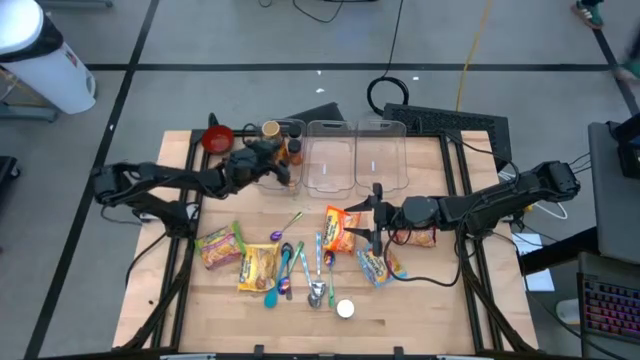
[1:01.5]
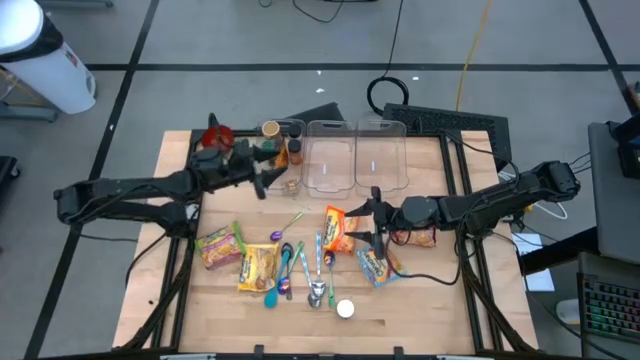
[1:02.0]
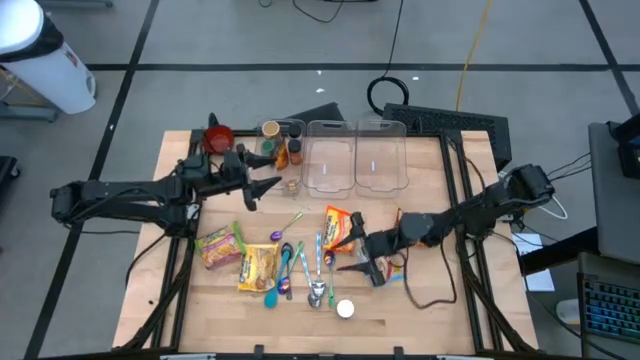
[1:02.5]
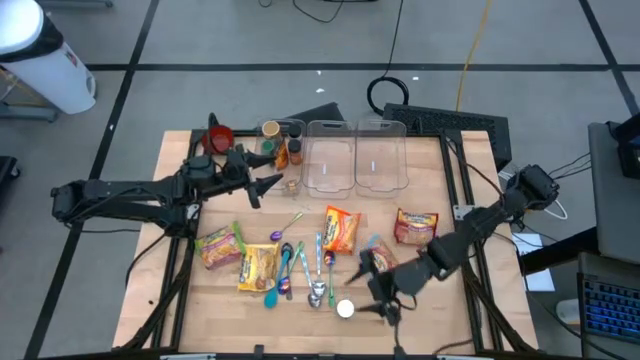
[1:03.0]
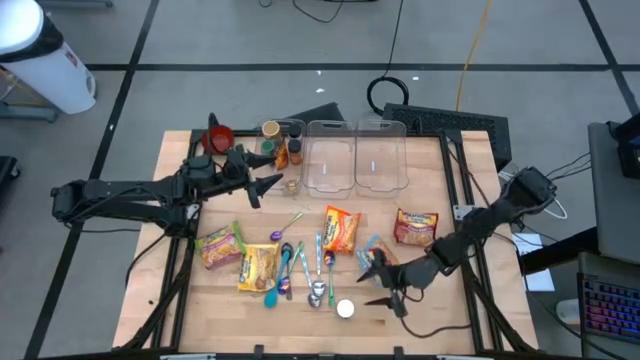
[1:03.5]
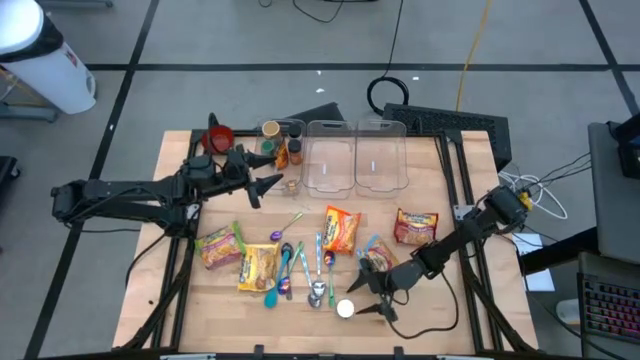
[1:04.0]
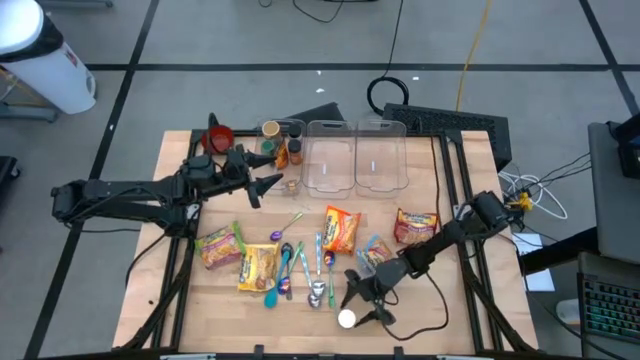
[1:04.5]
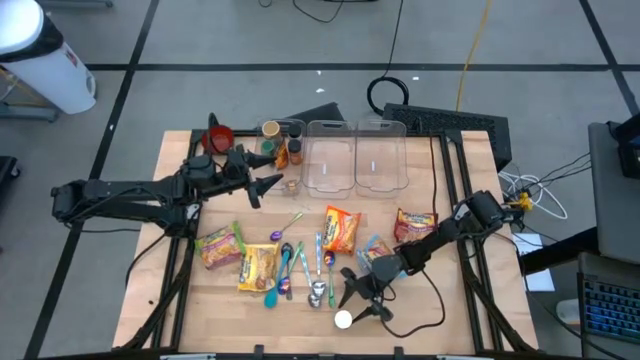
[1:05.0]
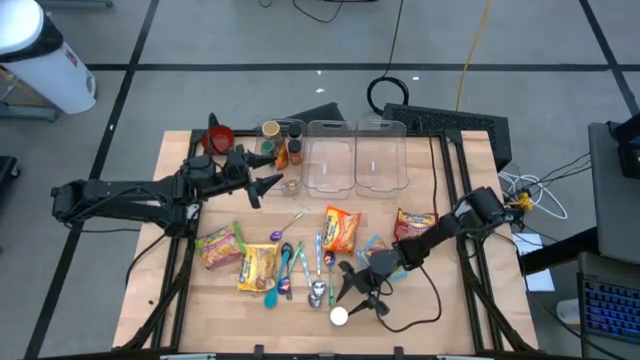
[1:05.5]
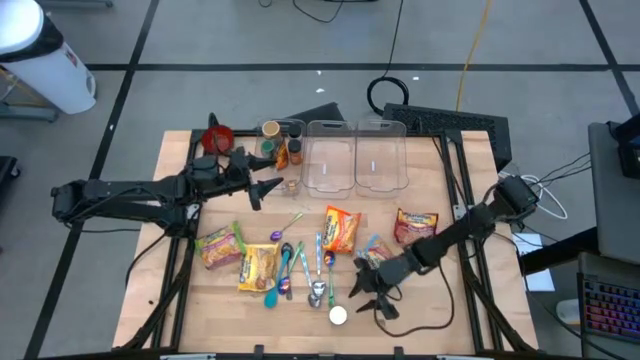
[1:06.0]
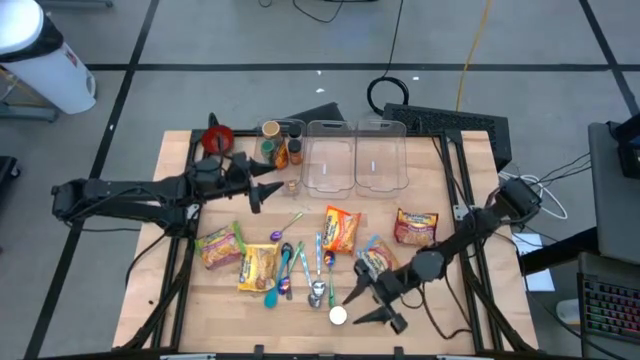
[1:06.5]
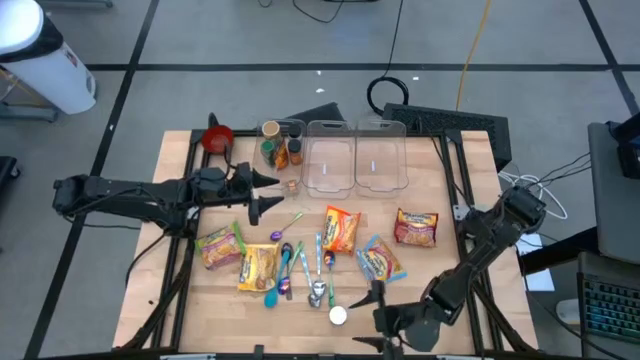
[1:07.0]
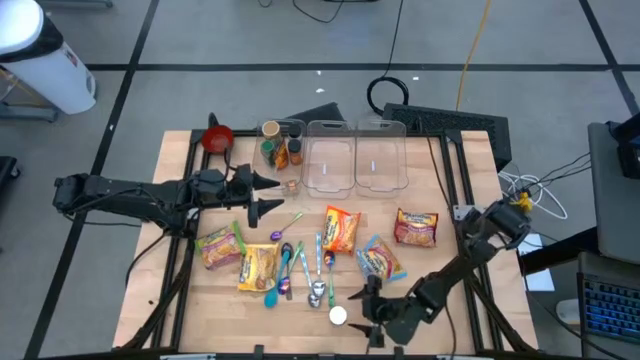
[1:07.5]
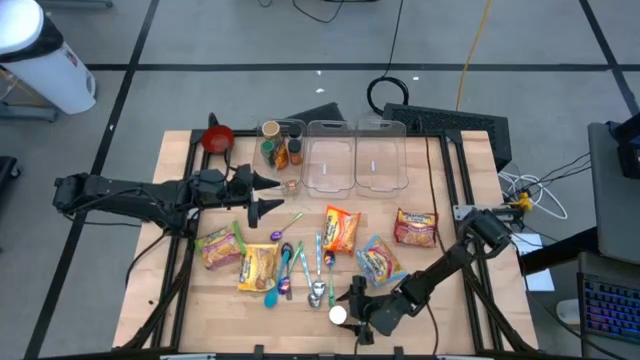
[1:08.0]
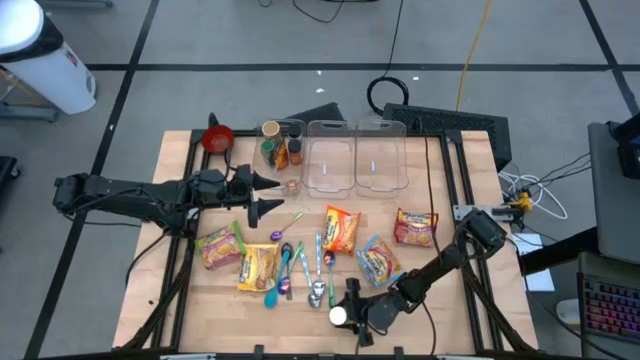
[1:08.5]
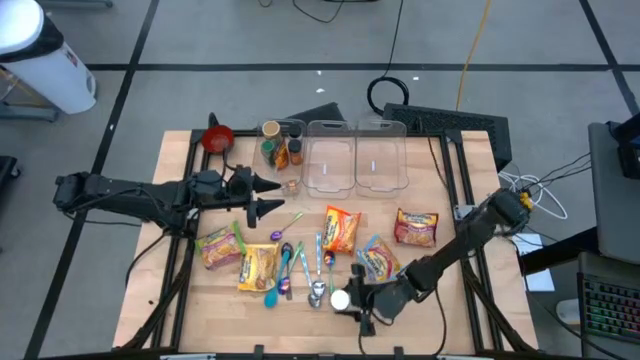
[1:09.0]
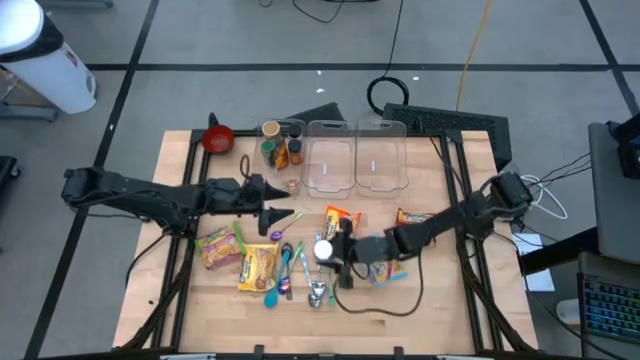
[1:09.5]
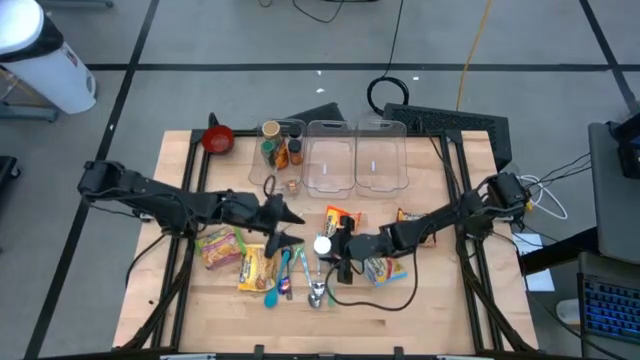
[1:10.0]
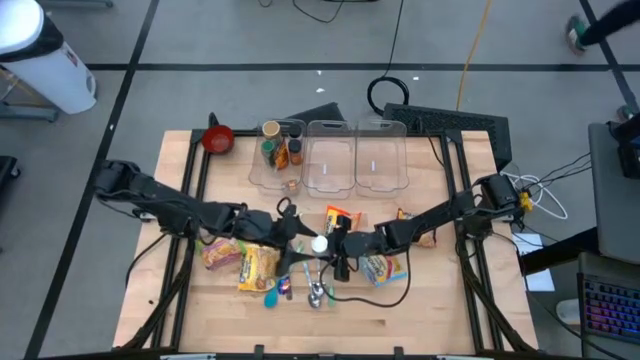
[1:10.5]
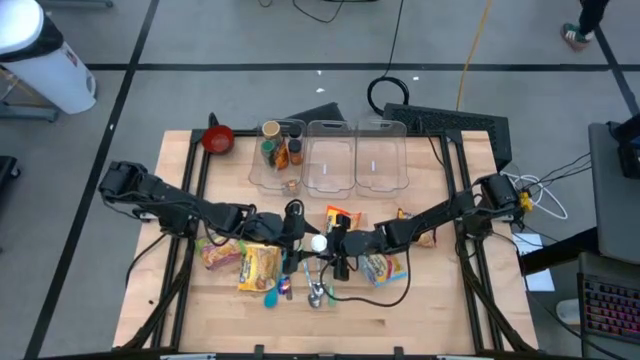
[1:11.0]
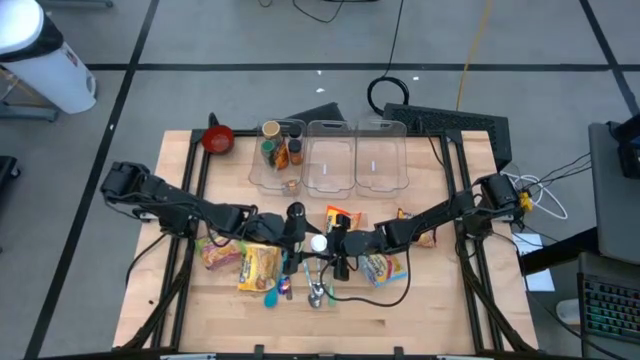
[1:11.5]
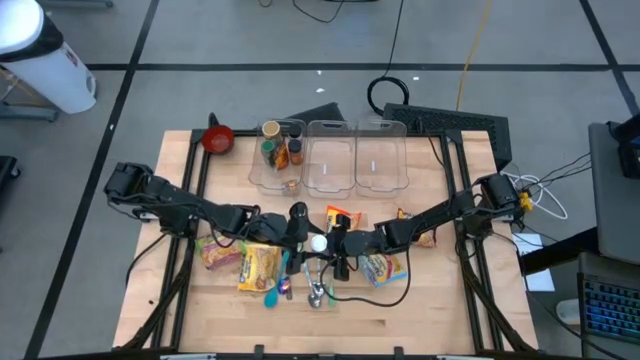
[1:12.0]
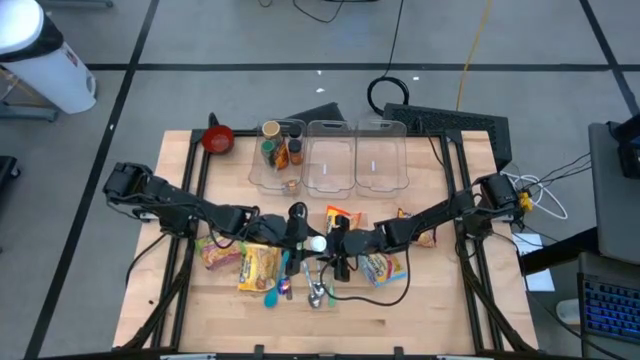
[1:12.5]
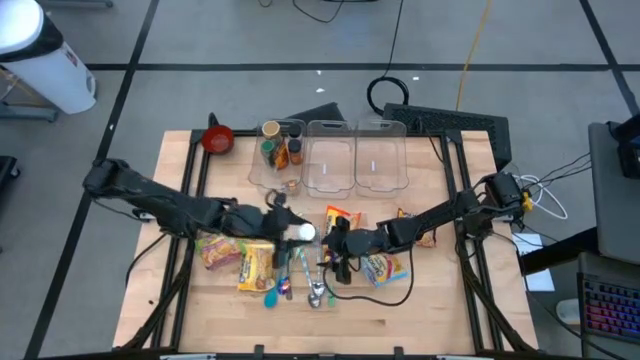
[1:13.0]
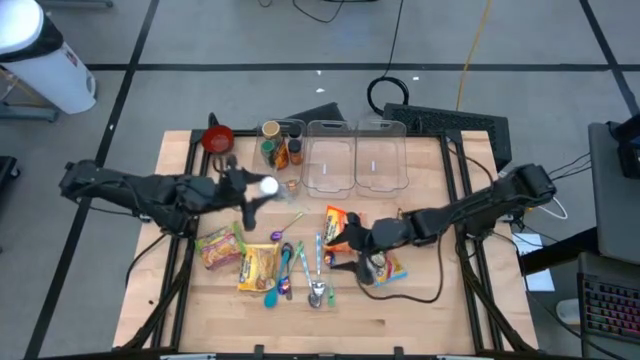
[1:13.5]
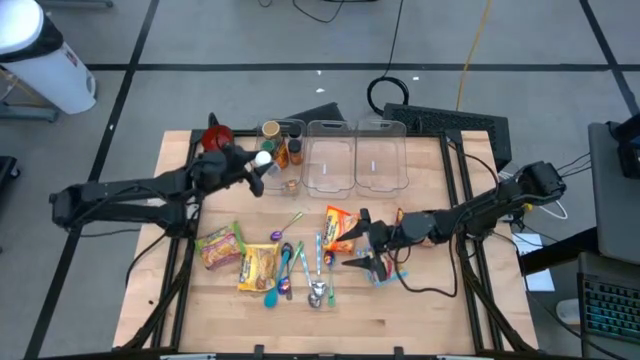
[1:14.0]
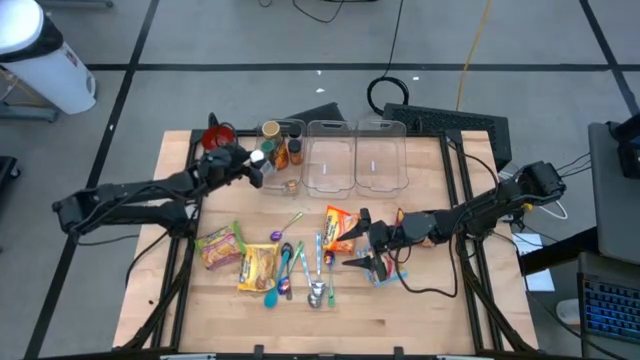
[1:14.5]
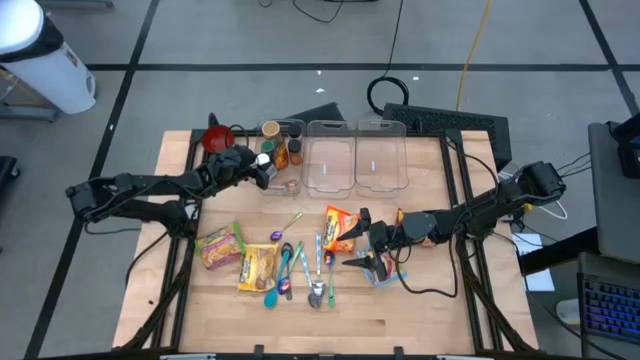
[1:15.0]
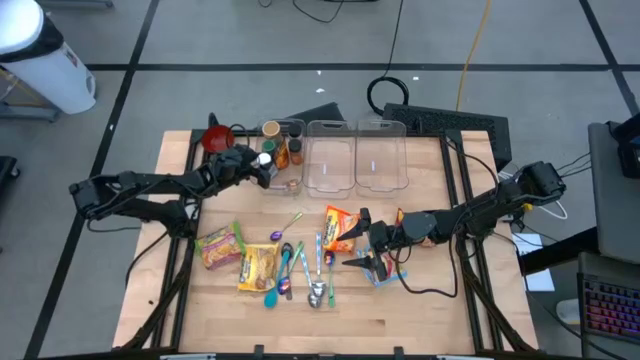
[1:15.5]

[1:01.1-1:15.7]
Task: Pick & Place Food Item
Put the white seasoning bottle into the left transparent bin

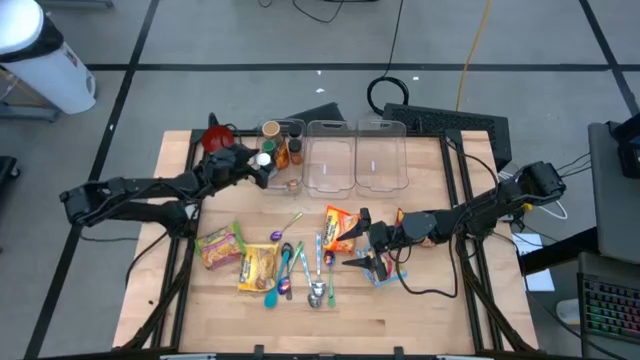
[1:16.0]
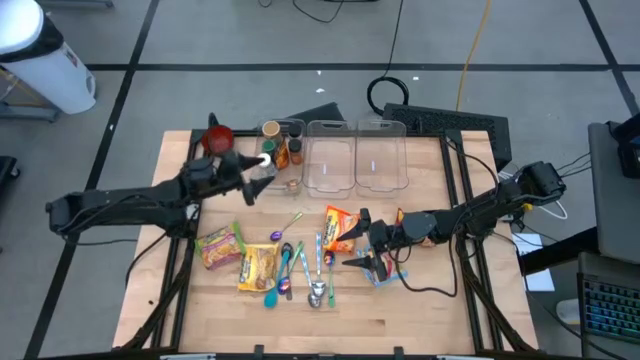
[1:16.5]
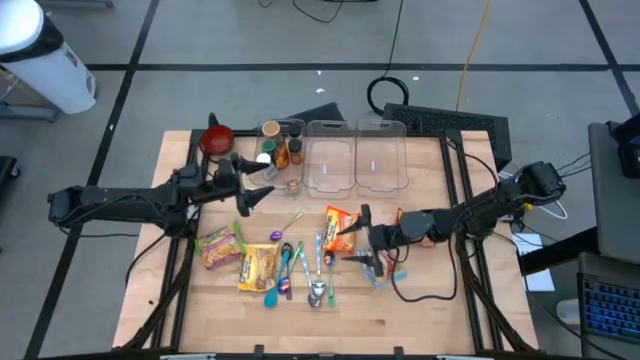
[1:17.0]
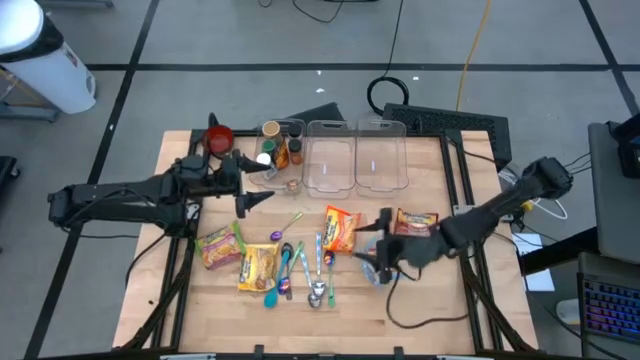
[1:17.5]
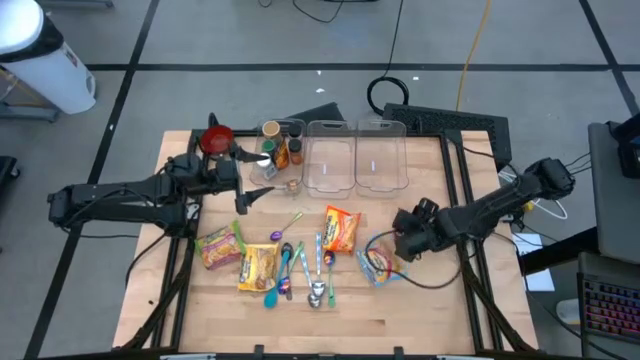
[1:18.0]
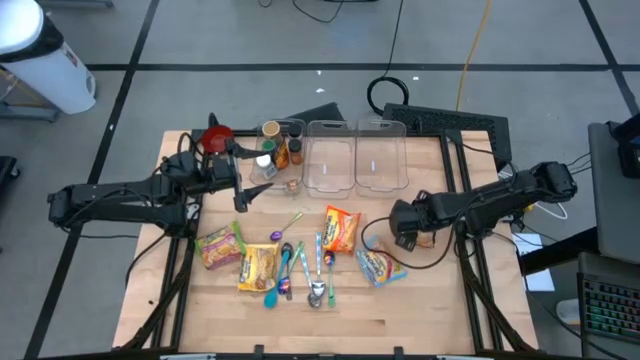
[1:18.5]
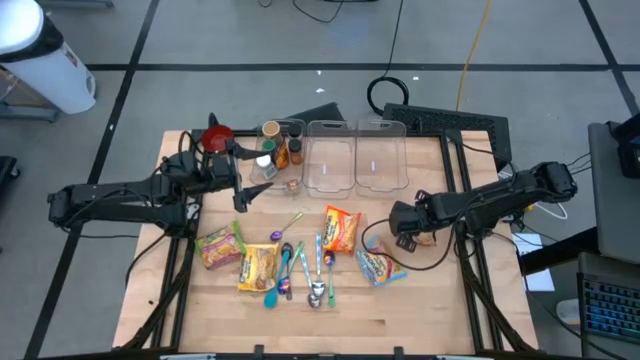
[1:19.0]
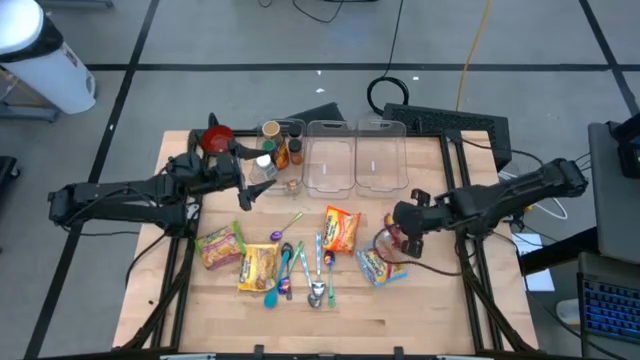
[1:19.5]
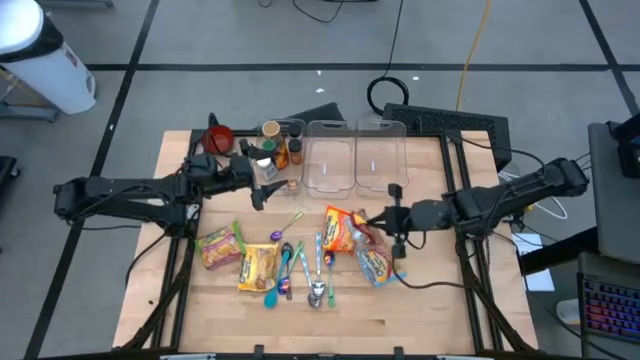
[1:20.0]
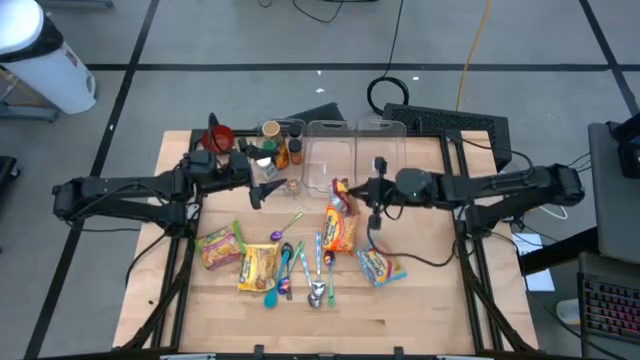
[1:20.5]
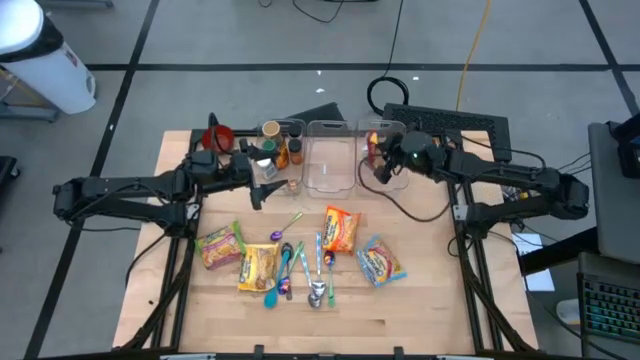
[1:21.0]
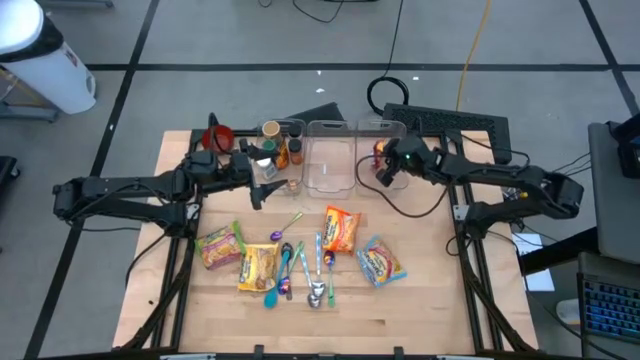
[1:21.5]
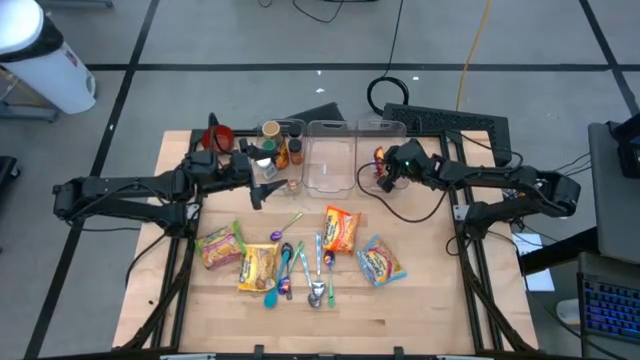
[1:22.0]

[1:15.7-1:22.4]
Put the red noodle pack into the right transparent bin
